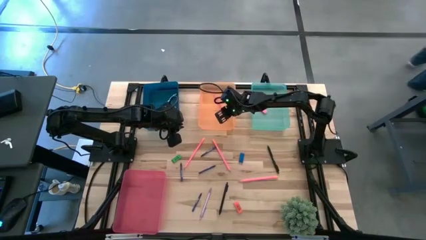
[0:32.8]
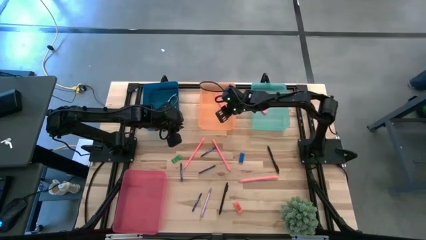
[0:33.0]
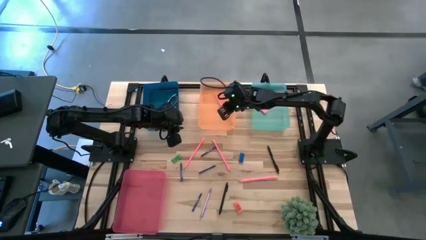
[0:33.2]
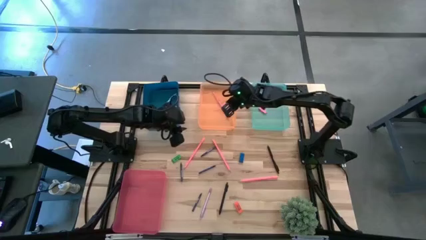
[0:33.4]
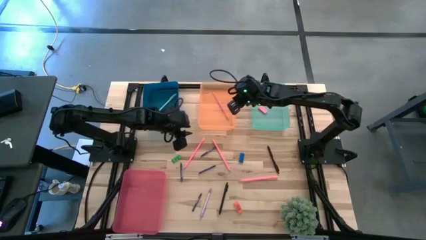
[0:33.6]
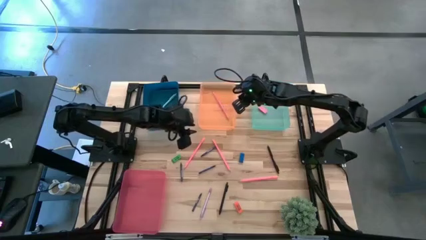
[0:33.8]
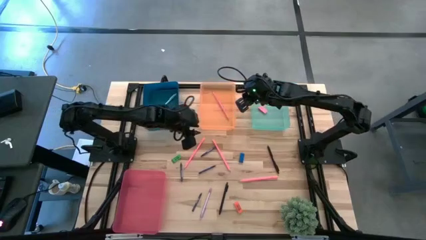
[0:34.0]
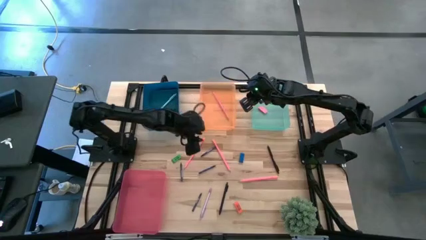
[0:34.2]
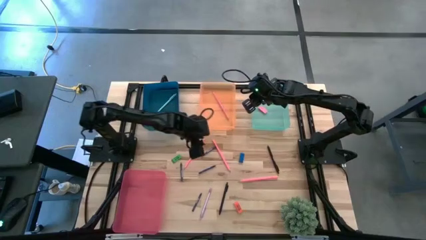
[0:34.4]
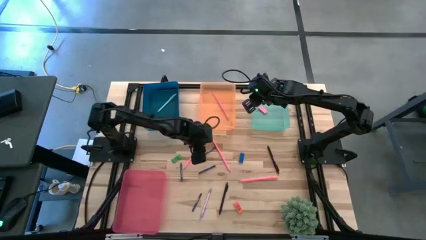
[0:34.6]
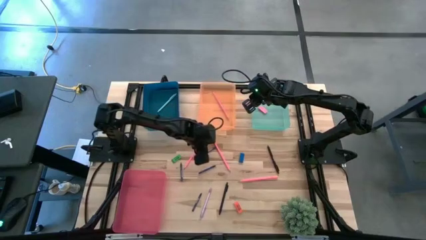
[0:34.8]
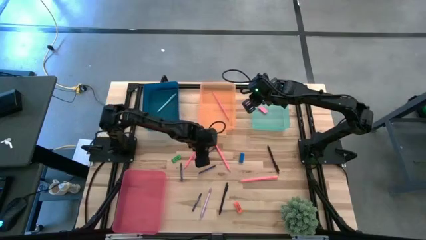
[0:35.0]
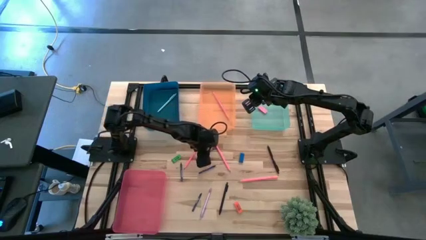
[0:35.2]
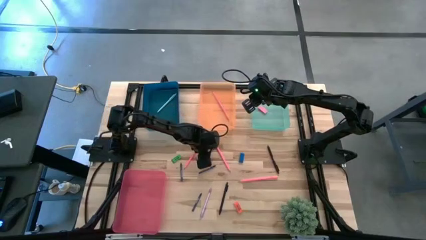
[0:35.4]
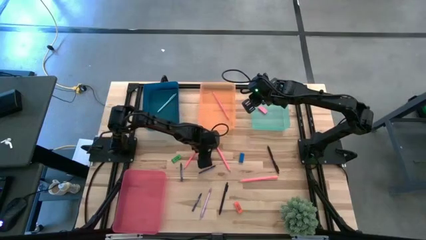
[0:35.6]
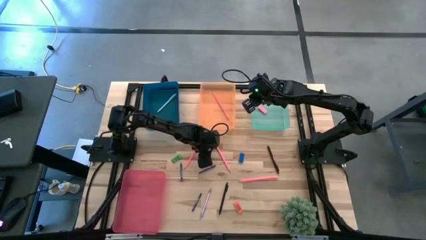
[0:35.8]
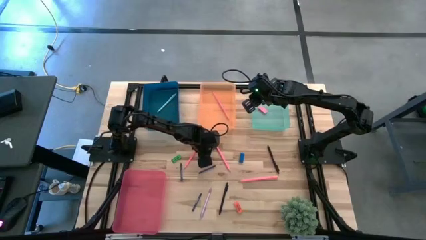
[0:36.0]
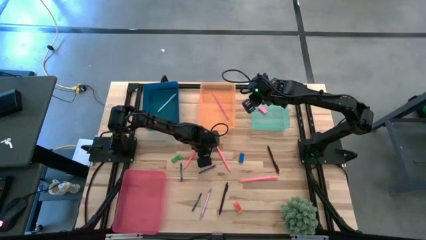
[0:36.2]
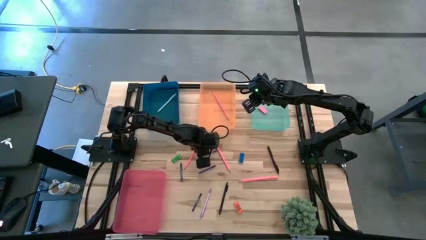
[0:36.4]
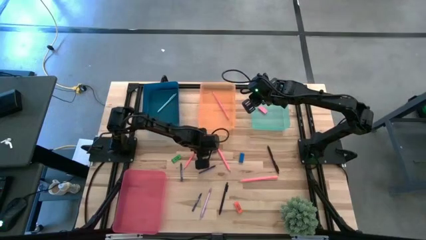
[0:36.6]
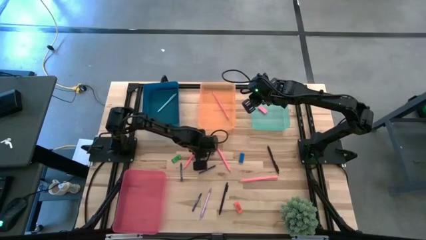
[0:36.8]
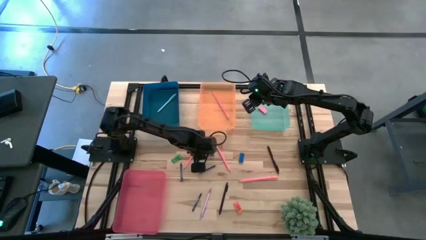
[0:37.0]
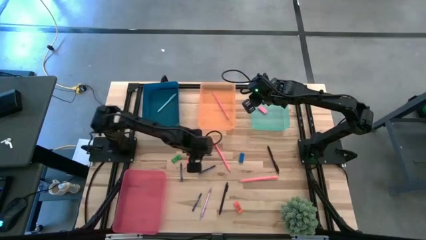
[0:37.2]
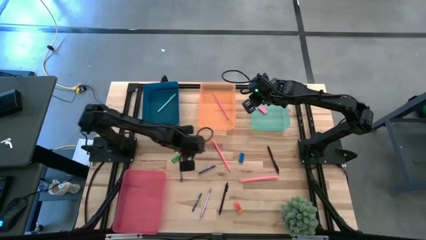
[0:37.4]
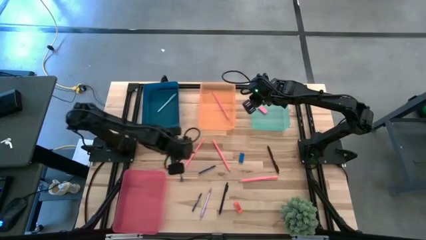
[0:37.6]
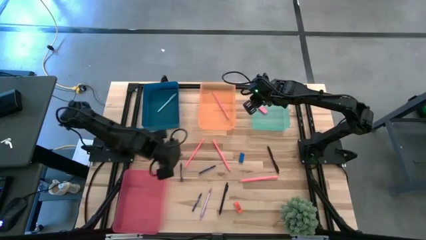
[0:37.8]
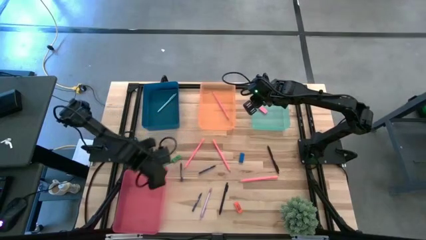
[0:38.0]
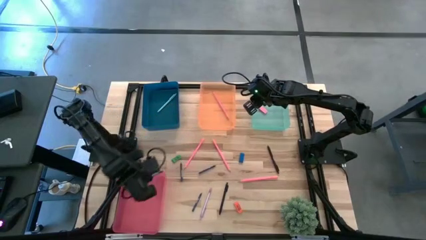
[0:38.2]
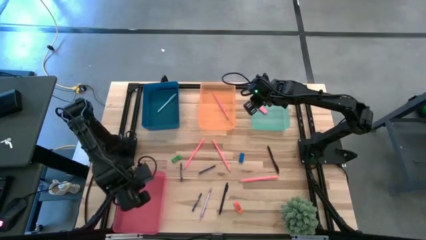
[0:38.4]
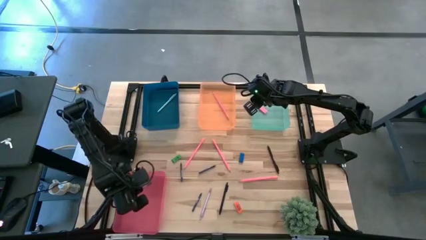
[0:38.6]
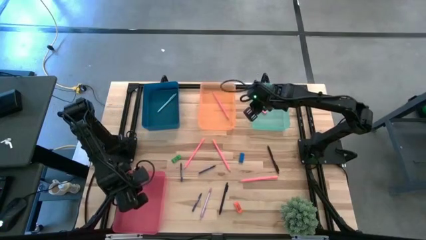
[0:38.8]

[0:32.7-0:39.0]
Task: Sort crayons/erasers/pens/pencils in bins
Put the crayon into the pink bin

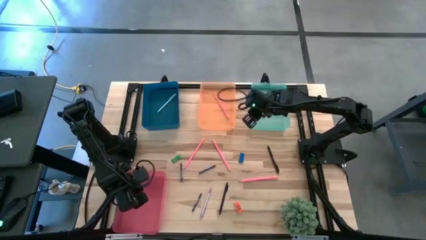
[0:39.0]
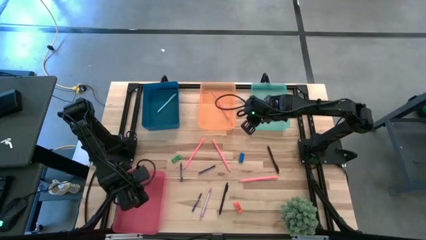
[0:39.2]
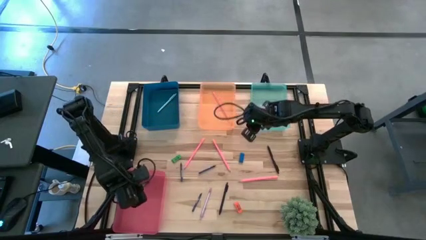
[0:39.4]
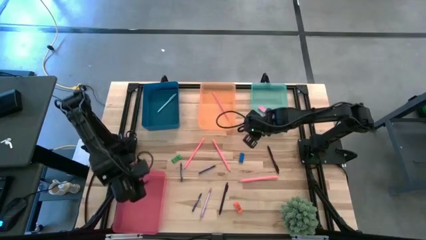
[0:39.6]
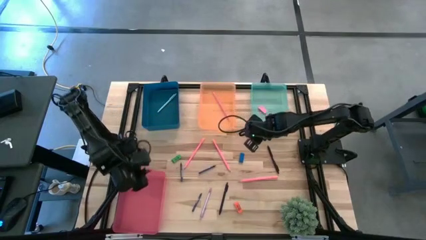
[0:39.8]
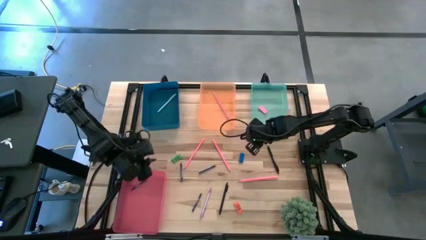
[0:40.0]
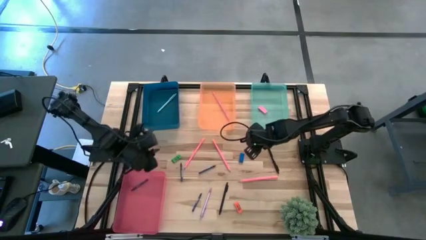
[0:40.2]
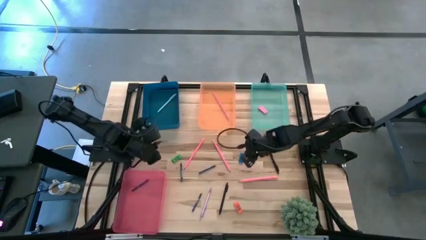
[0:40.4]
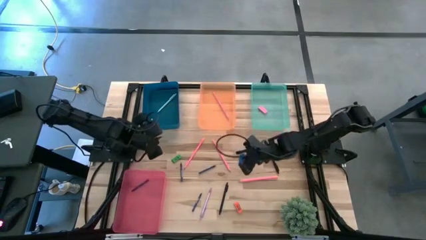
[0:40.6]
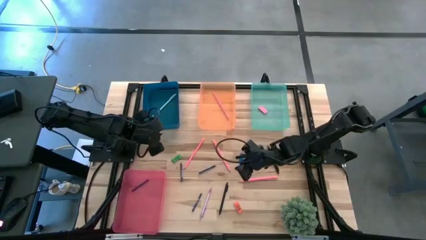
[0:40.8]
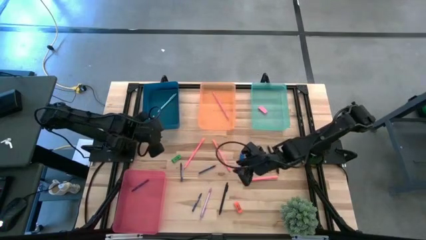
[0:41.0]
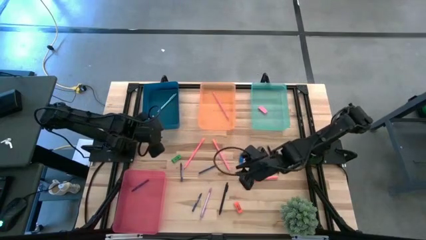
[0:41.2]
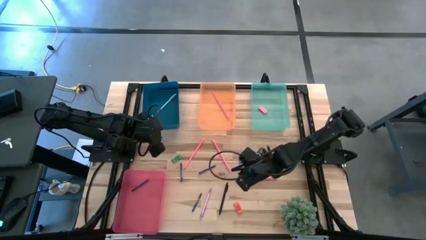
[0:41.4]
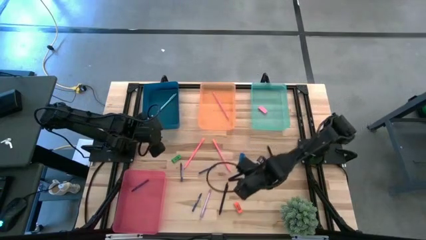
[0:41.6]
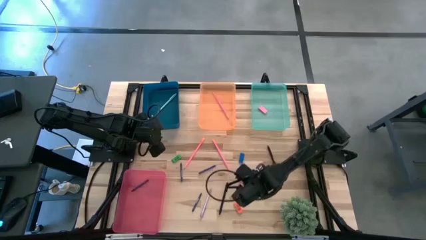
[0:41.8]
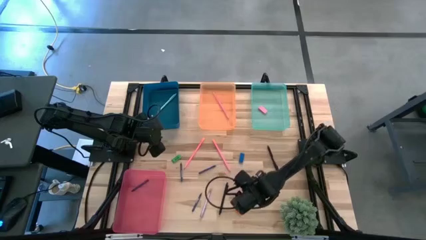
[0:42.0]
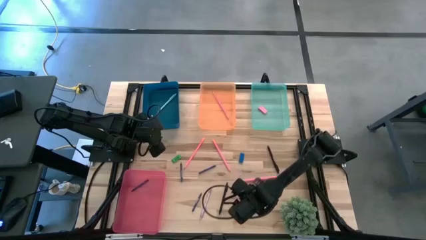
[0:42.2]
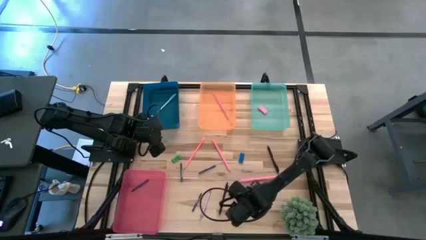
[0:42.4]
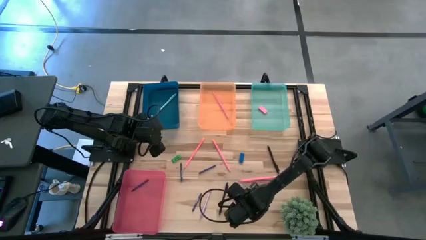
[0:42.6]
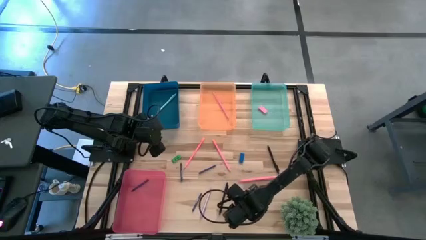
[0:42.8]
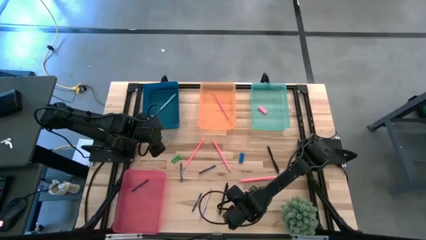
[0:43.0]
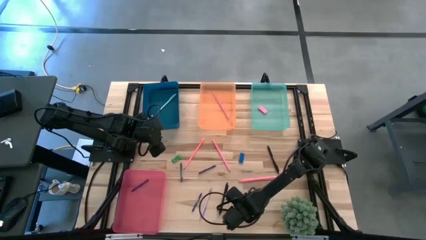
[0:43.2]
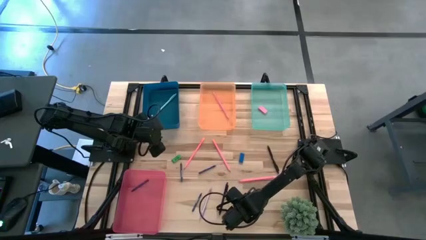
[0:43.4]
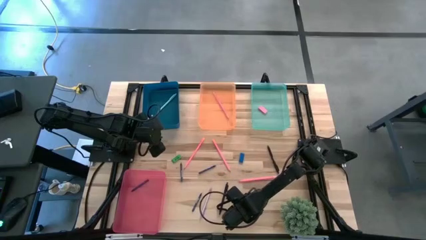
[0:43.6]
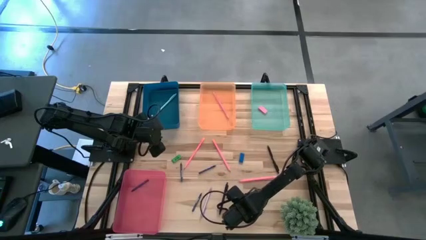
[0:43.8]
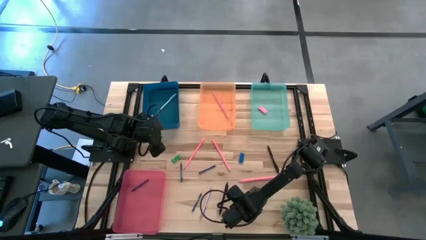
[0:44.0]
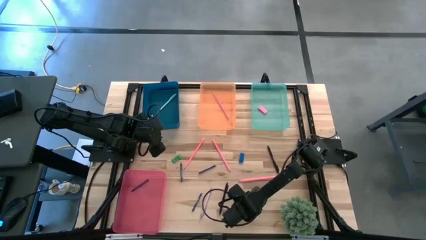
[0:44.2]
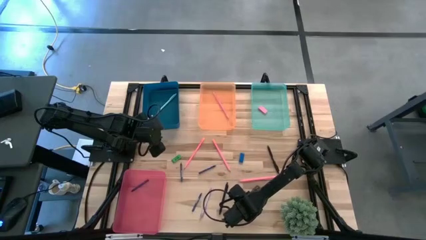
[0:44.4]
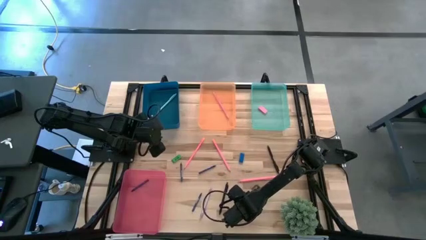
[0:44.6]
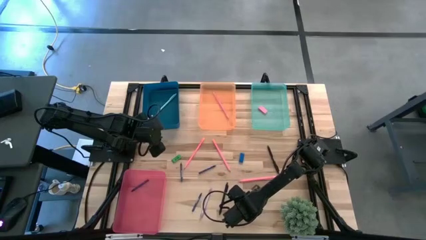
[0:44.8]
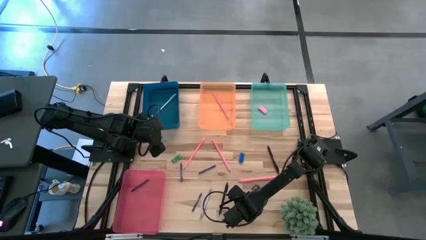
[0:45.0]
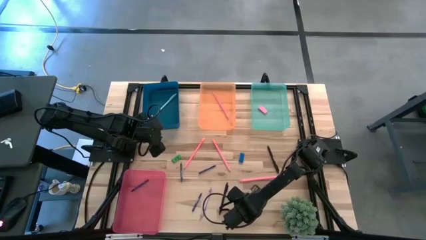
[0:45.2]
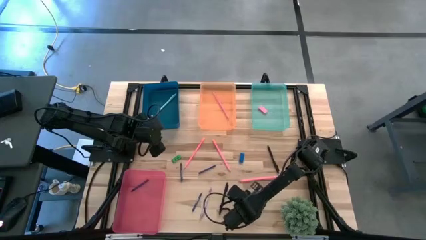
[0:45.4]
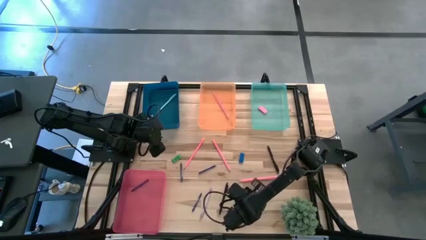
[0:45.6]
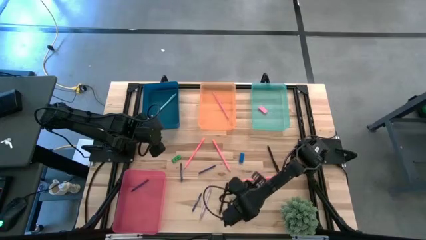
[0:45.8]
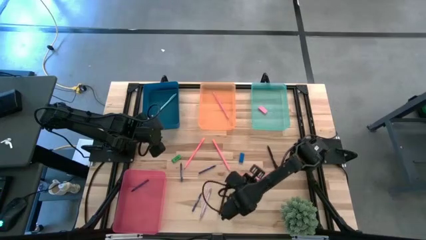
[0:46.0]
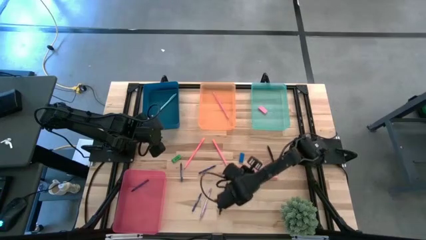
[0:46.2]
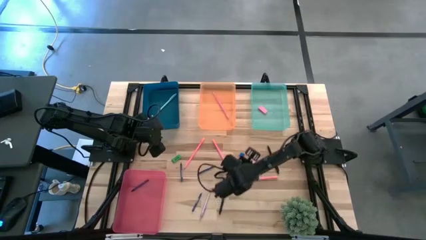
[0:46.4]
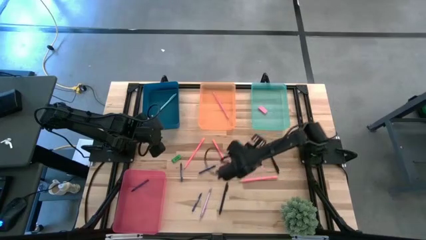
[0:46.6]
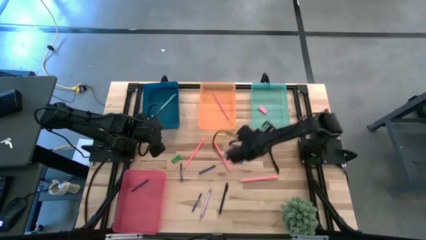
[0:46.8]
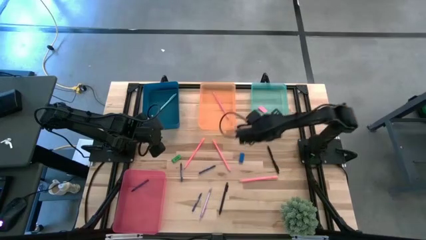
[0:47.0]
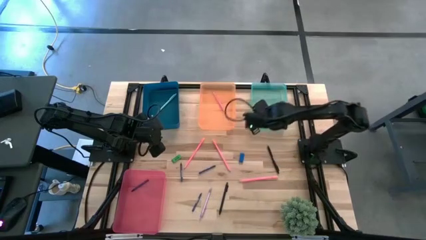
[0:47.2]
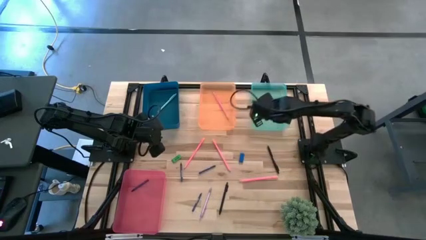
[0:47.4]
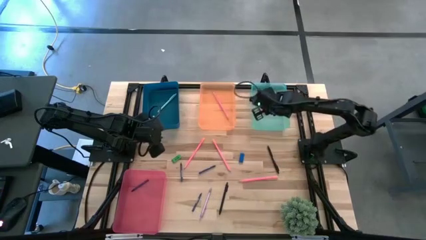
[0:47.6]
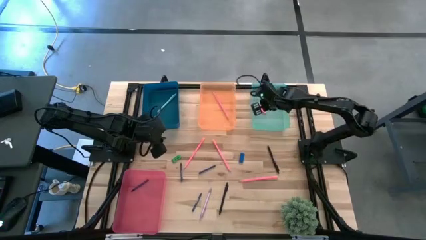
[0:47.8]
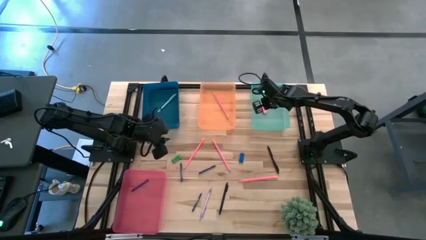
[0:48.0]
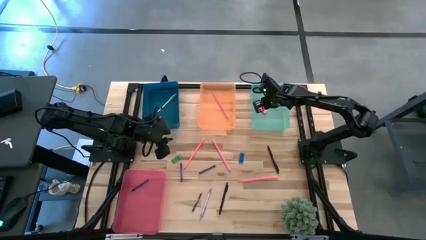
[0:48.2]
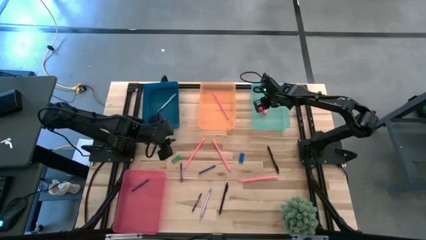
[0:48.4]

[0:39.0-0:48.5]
Put the orange eraser into the green bin

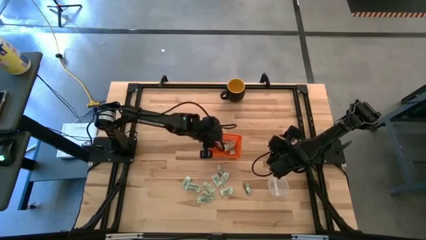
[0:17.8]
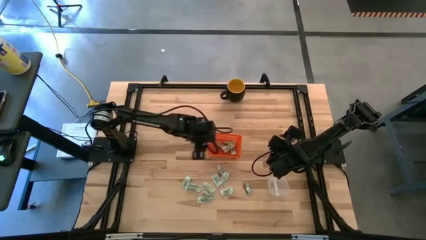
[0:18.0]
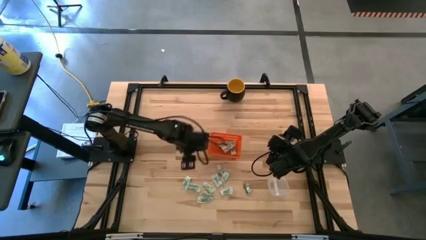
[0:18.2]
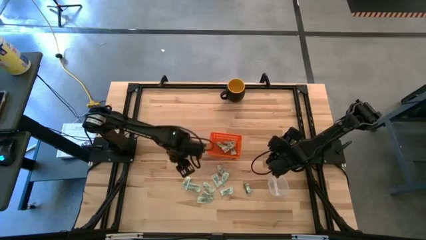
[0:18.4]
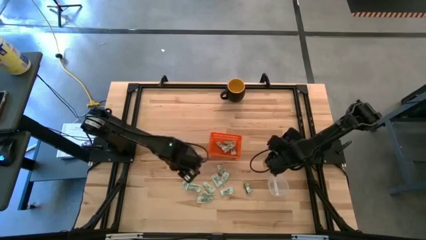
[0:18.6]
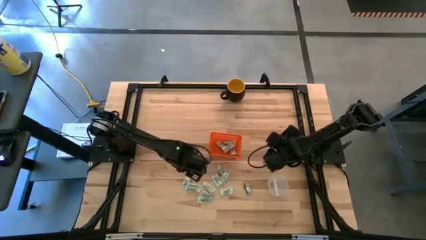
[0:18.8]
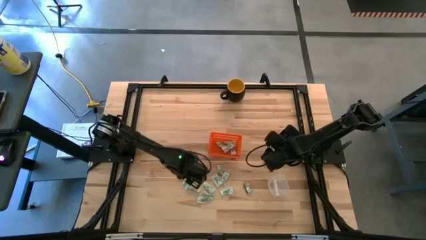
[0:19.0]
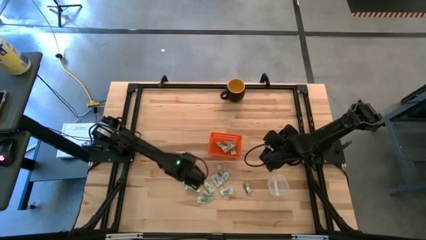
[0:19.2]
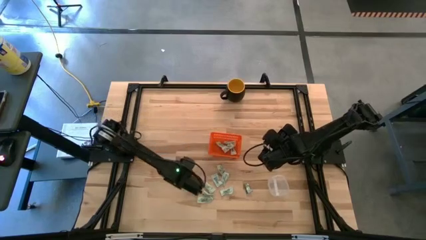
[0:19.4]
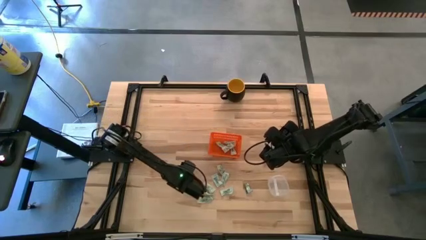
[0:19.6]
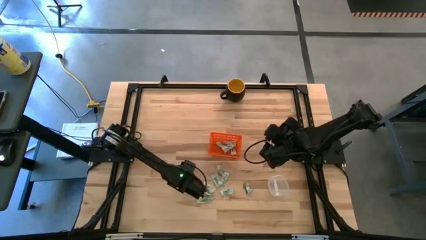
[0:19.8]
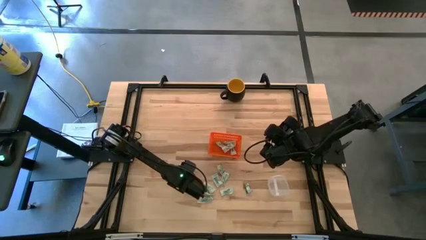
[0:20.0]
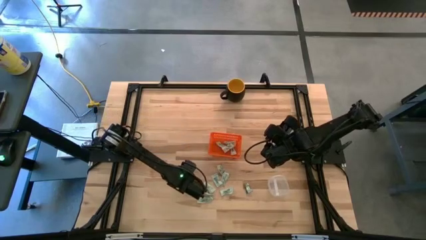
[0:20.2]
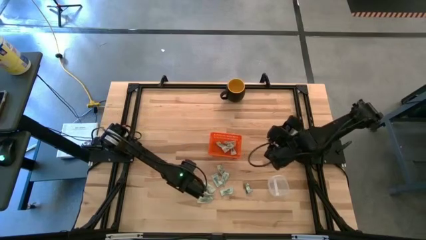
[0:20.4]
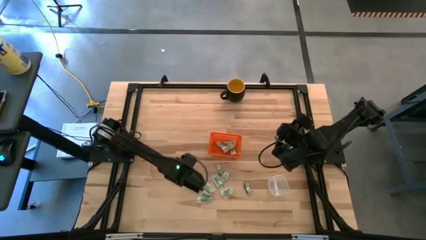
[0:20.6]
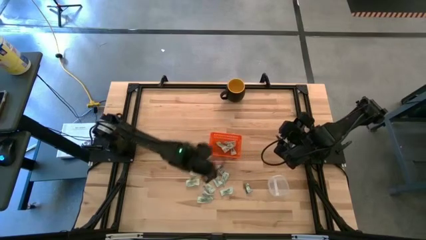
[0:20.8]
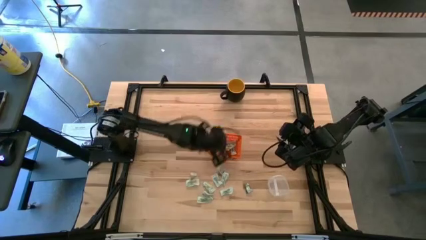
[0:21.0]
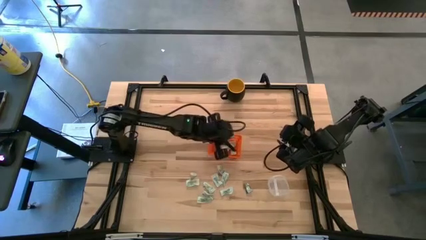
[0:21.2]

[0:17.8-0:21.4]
Task: Pick and place items into bin
Put the light green stevia packet into the orange bin
